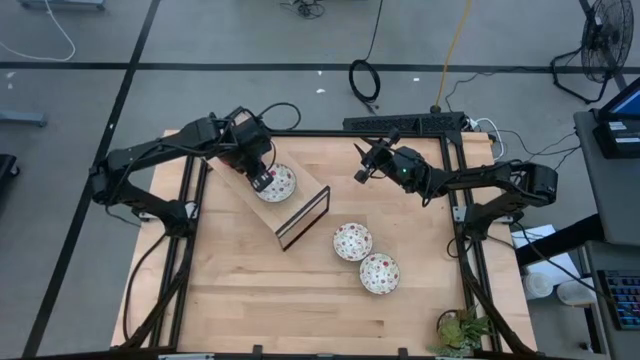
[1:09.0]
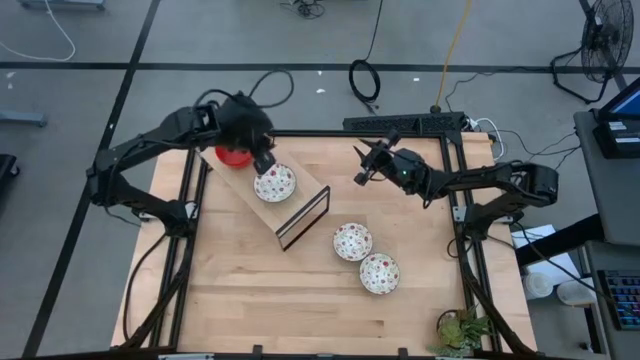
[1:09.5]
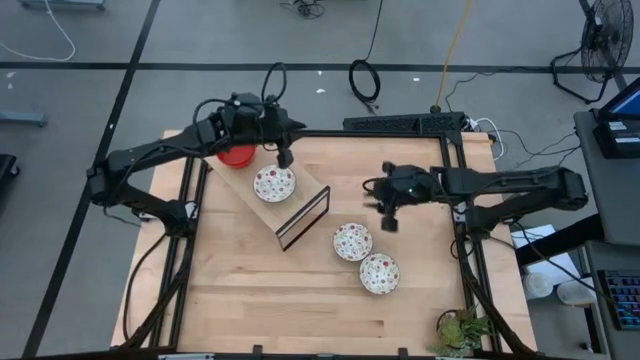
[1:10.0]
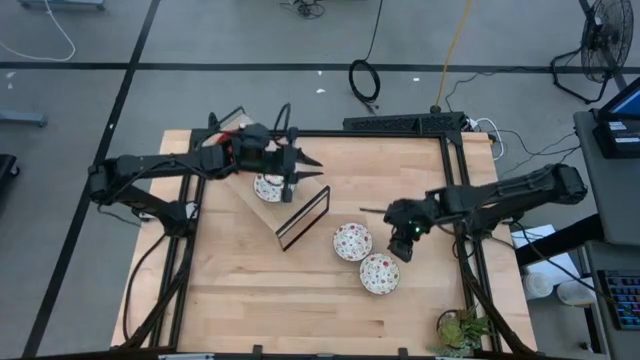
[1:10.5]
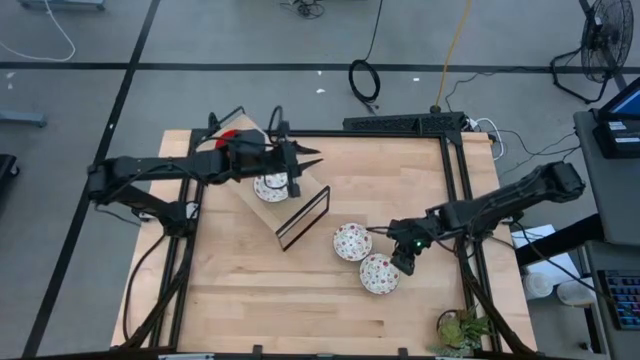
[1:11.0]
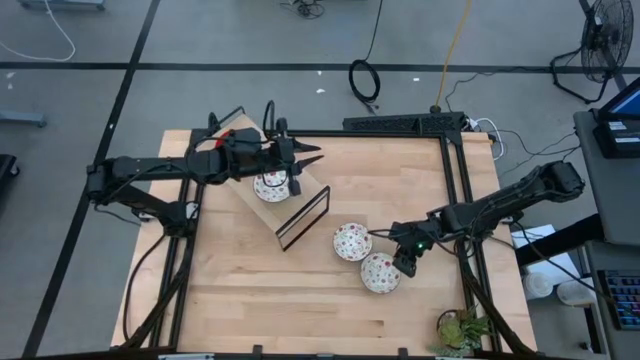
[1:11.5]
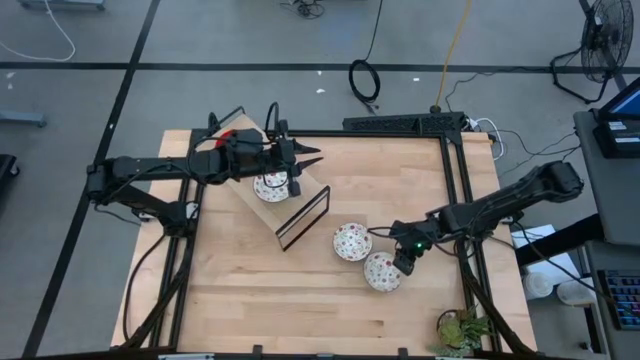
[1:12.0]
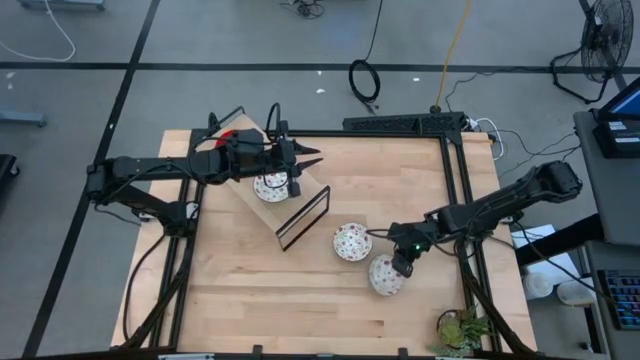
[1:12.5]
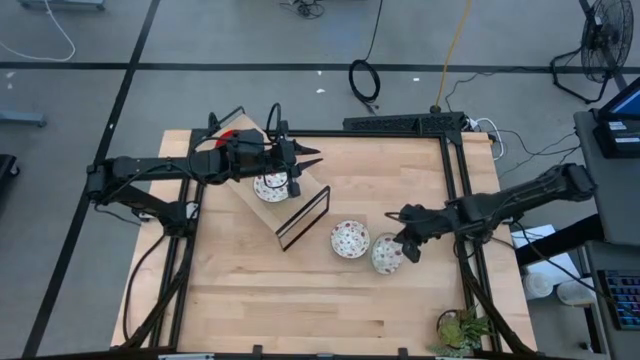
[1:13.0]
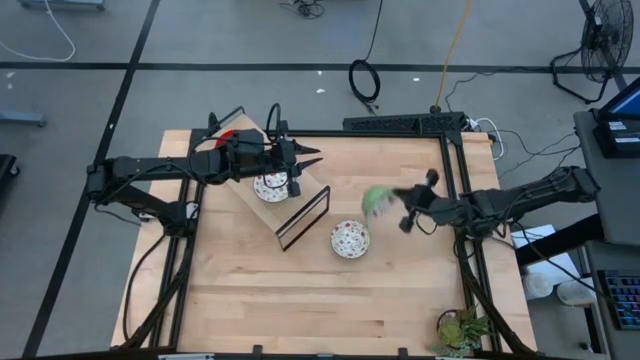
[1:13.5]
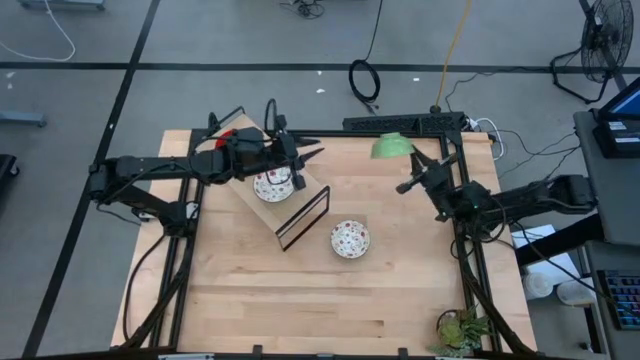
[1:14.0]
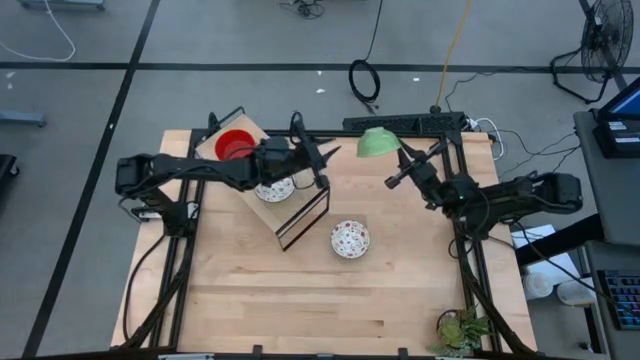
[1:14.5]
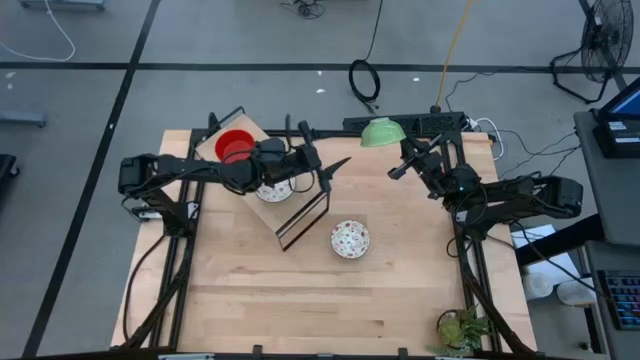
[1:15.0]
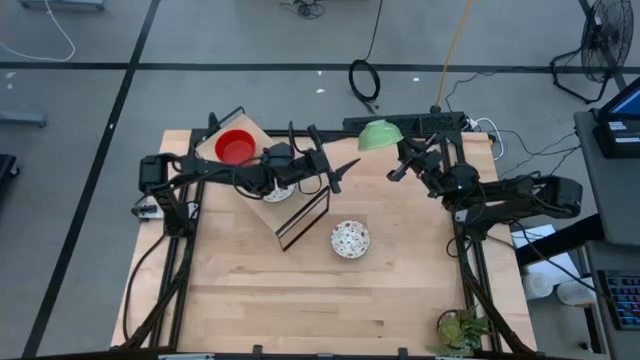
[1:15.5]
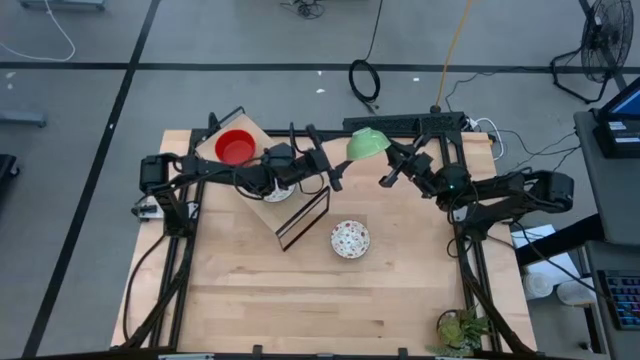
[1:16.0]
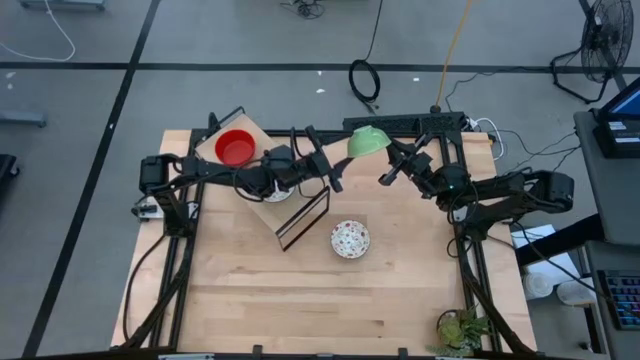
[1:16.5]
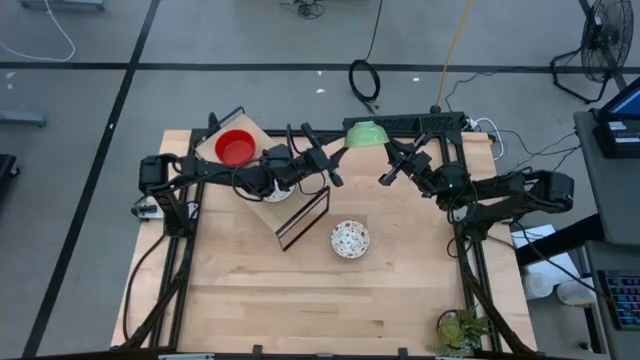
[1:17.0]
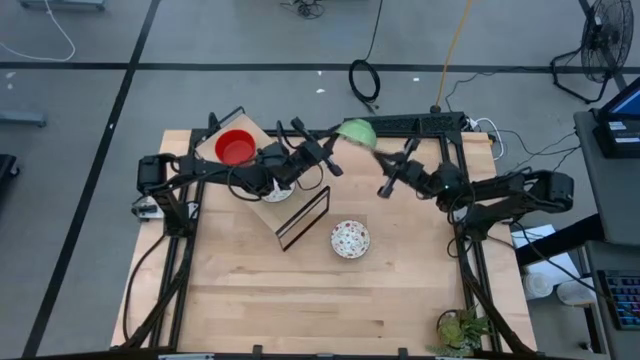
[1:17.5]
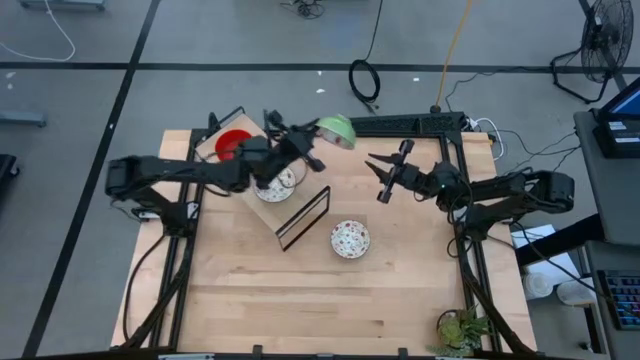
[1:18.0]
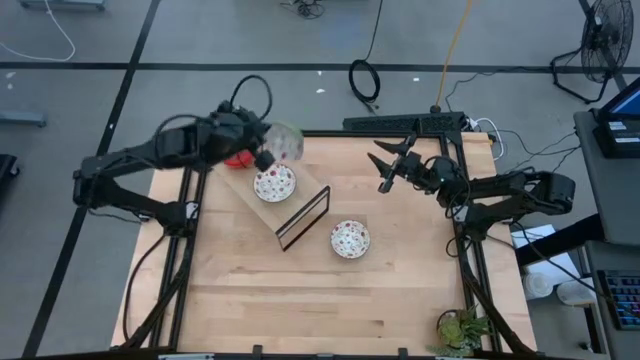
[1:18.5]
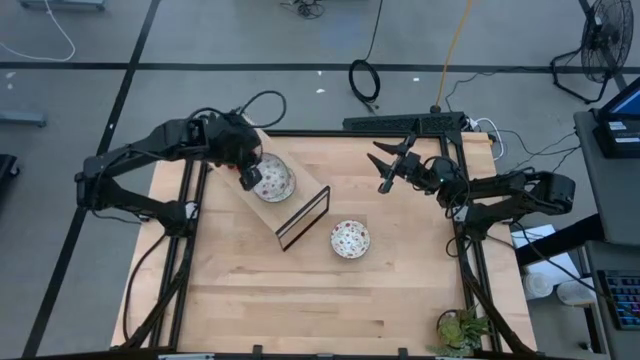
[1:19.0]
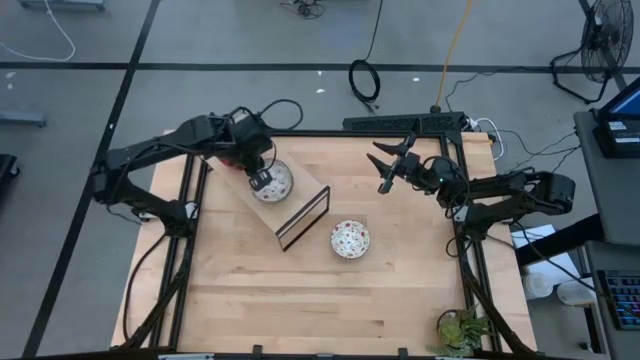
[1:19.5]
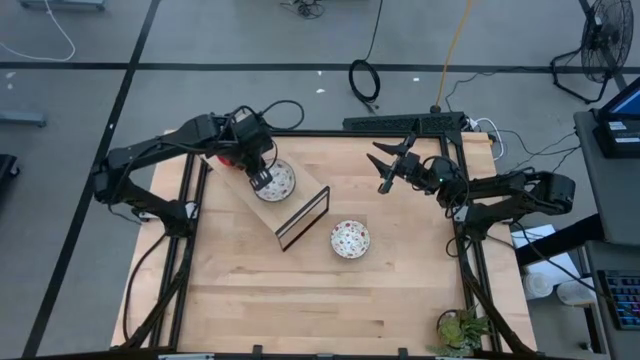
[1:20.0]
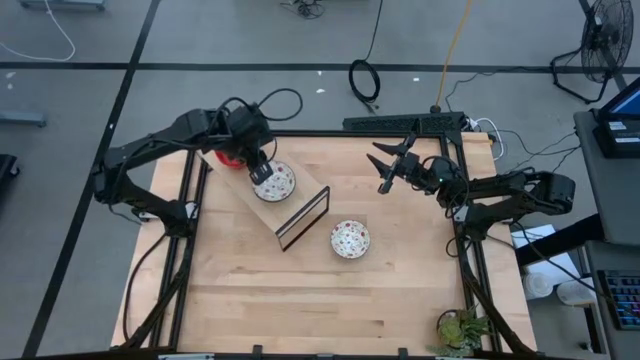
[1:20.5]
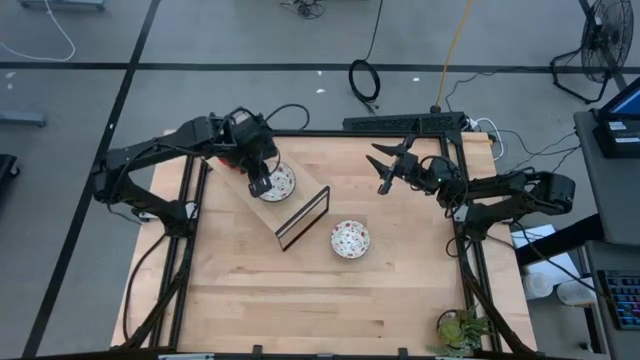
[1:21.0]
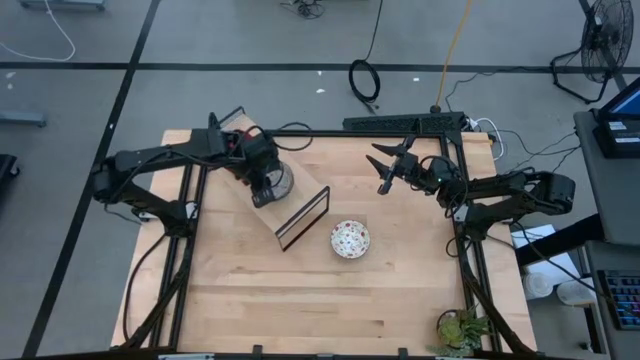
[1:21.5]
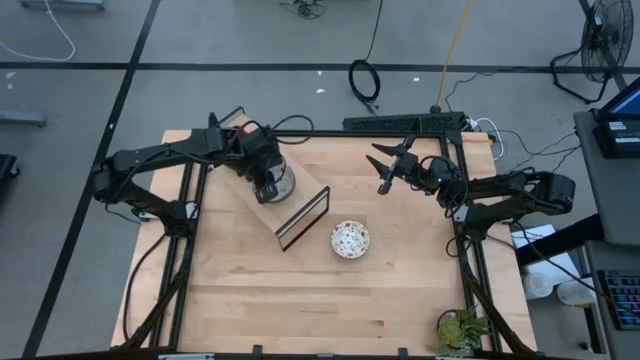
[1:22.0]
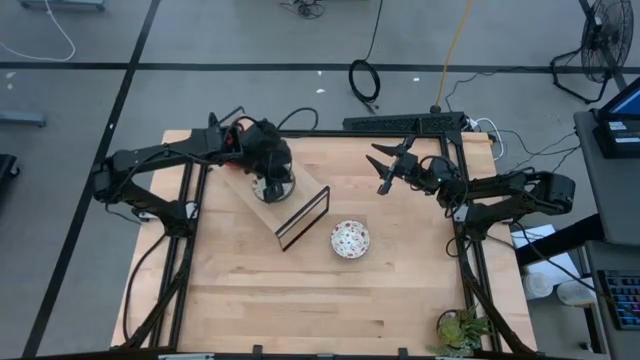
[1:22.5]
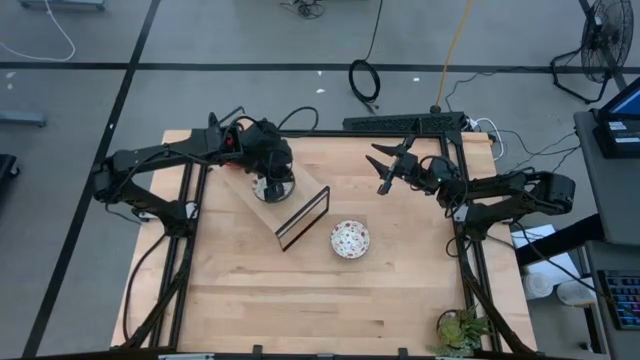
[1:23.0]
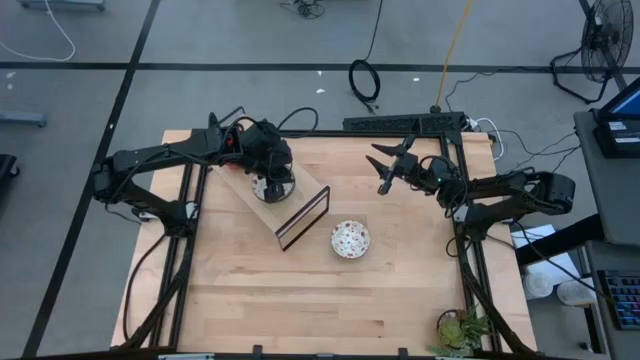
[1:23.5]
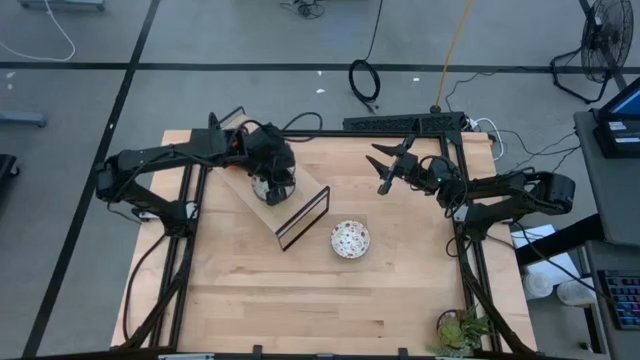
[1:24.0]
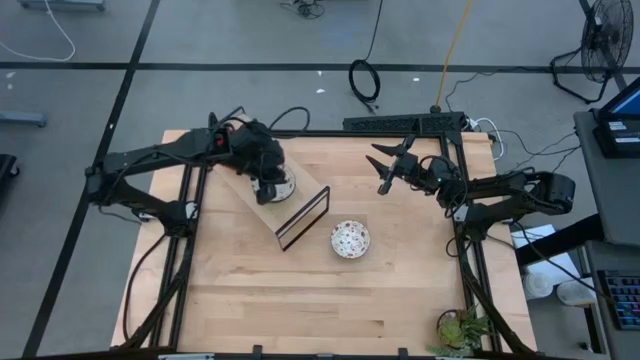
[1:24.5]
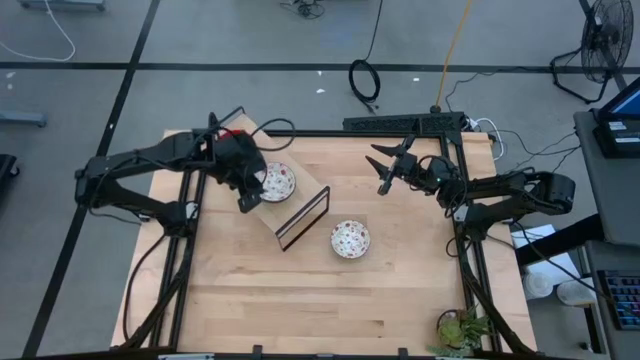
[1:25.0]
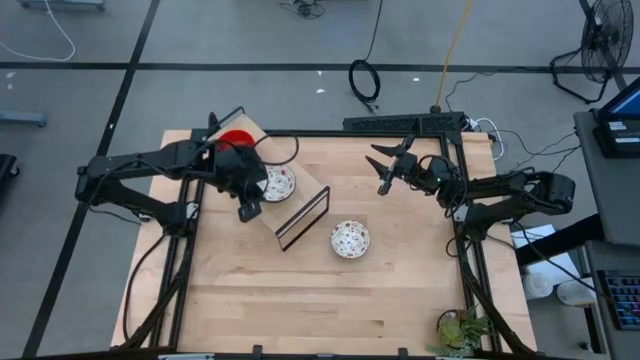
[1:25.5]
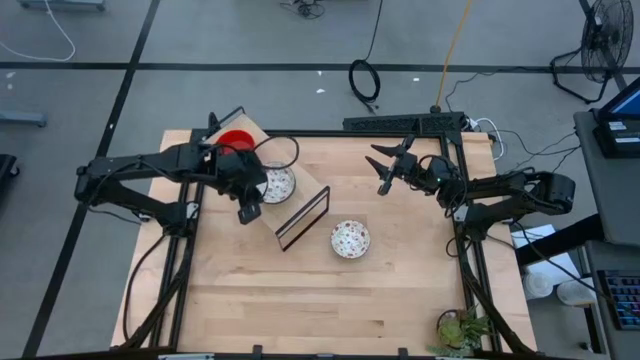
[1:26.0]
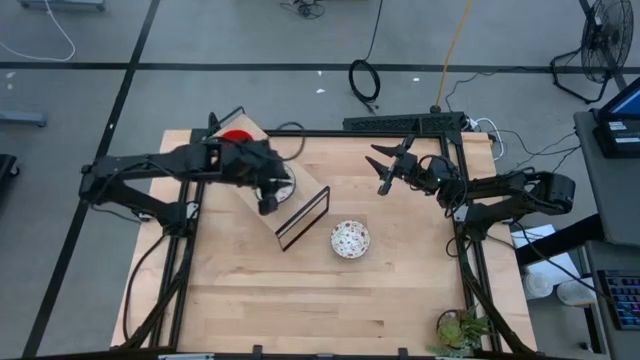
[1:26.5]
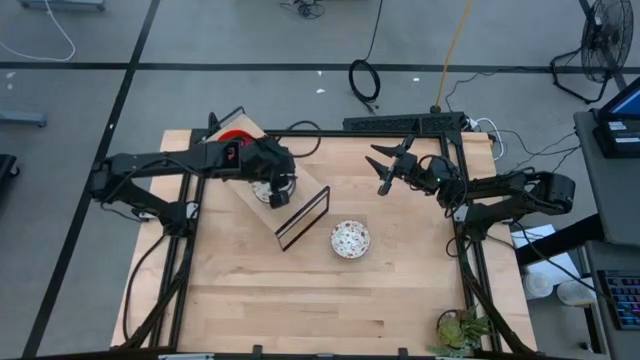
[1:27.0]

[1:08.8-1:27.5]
Task: Pick & Place Mini bowls
Stack the bottom white patterned bowl on the white patterned bowl on the shelf

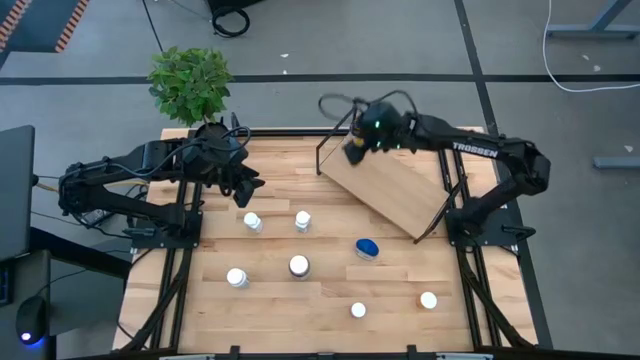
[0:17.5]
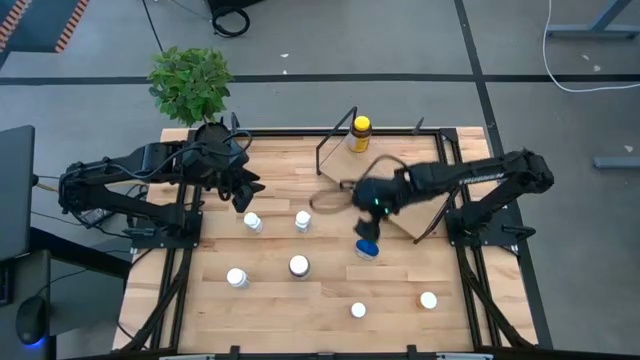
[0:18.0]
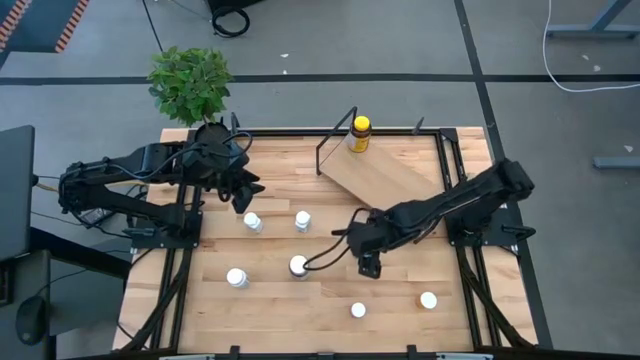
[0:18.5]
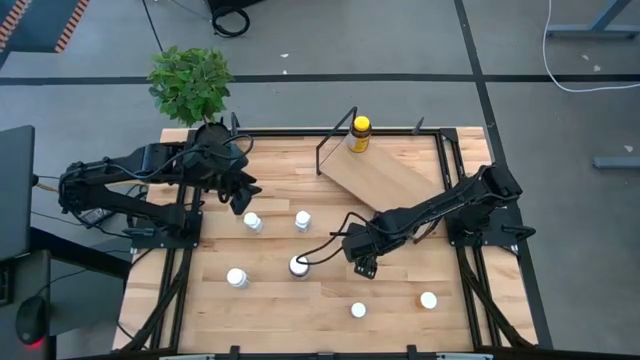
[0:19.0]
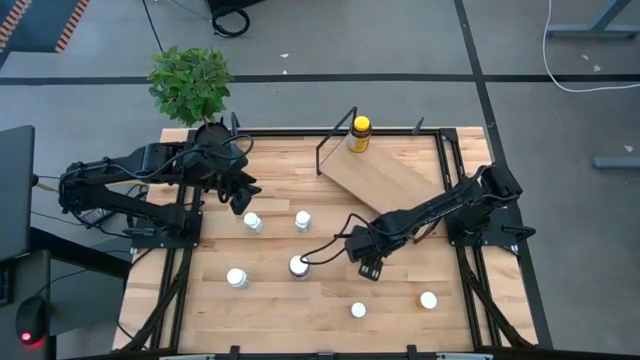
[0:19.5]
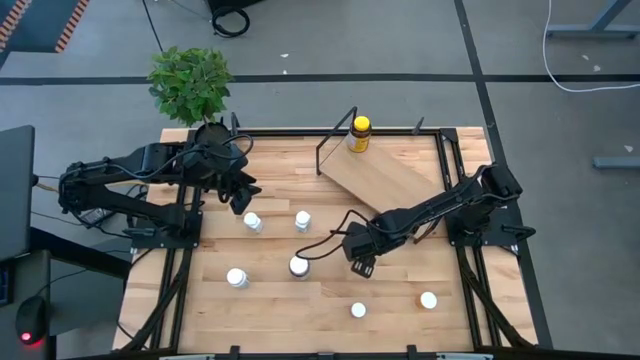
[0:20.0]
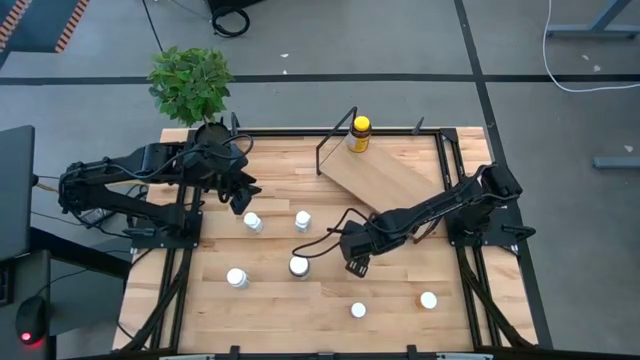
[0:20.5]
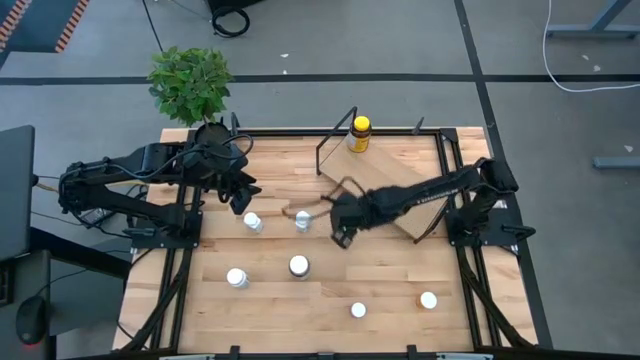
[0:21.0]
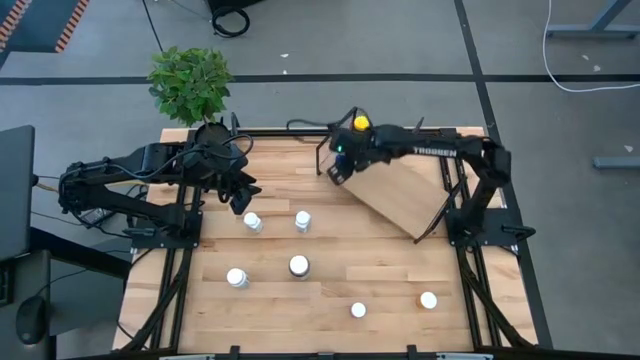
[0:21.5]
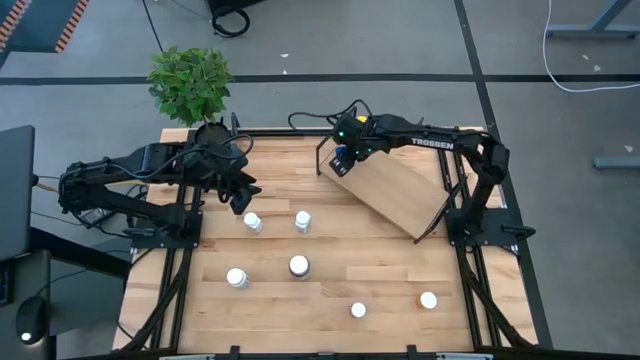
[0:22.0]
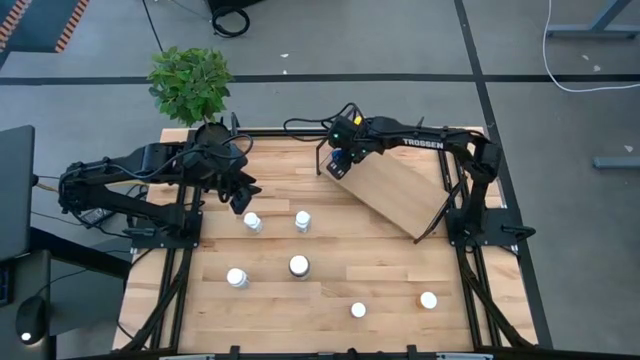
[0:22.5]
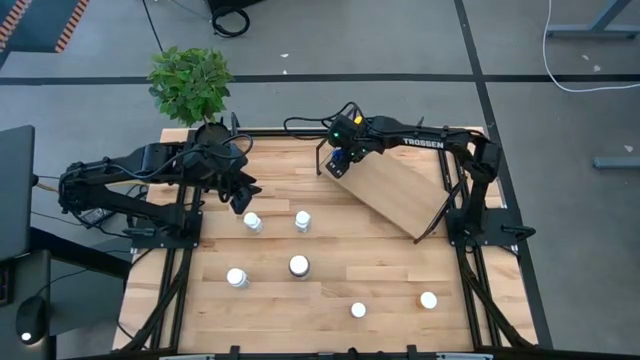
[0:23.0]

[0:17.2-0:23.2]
Task: Pick and place medicine bottles onto shelf by color
Put the blue medicine bottle on the shelf
